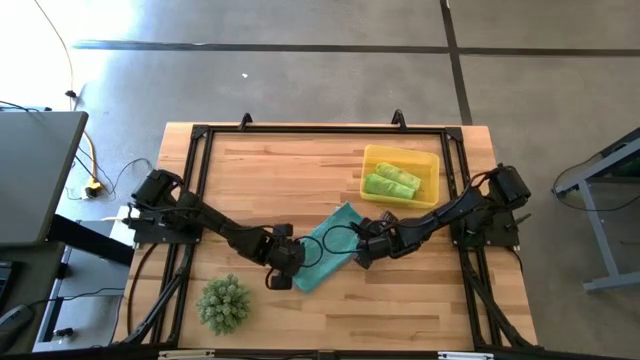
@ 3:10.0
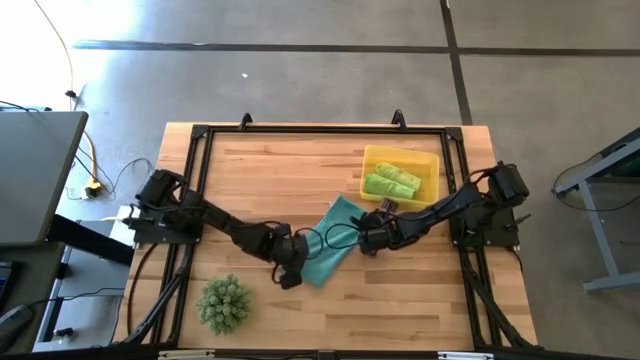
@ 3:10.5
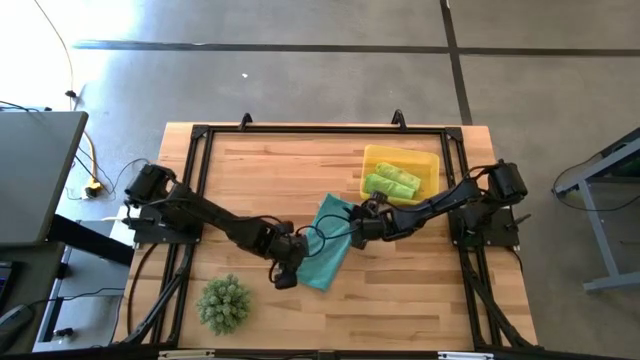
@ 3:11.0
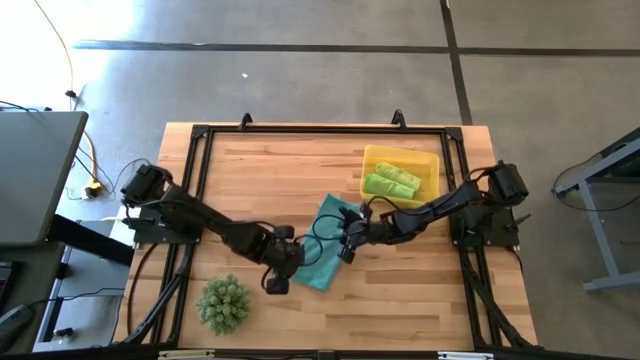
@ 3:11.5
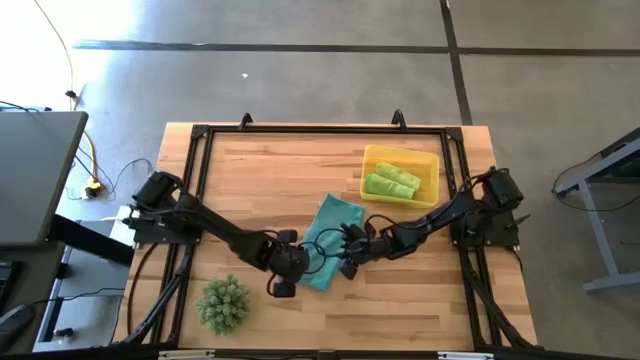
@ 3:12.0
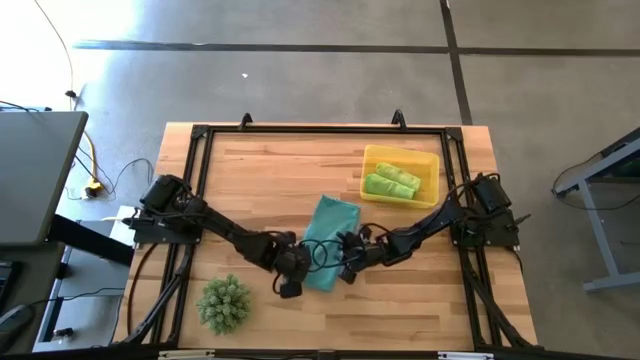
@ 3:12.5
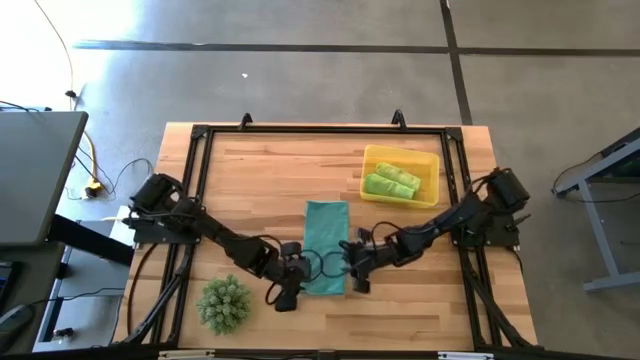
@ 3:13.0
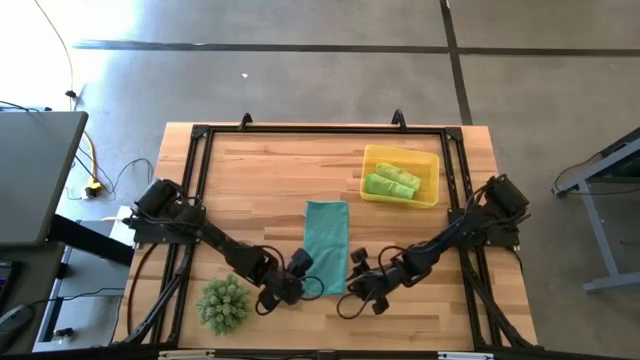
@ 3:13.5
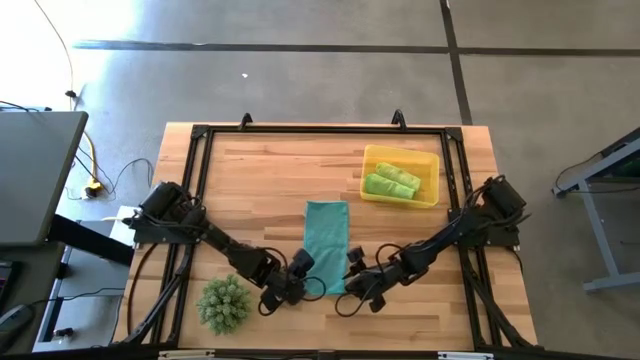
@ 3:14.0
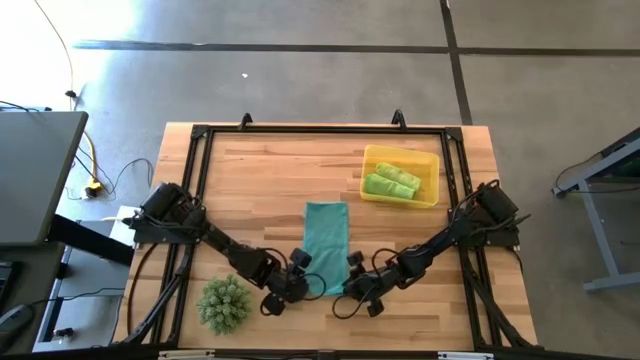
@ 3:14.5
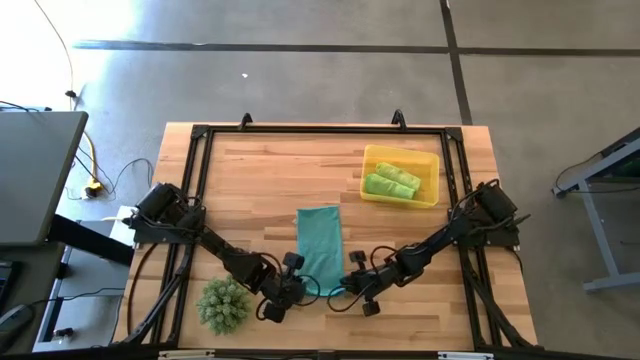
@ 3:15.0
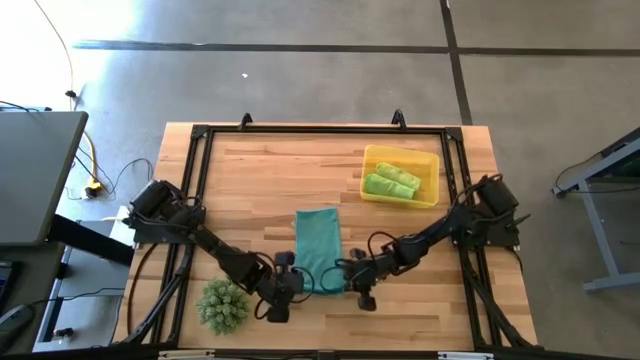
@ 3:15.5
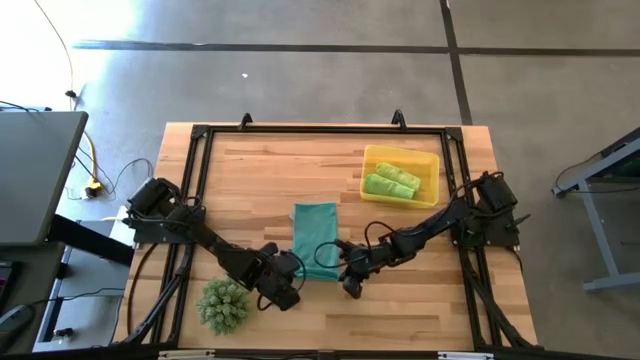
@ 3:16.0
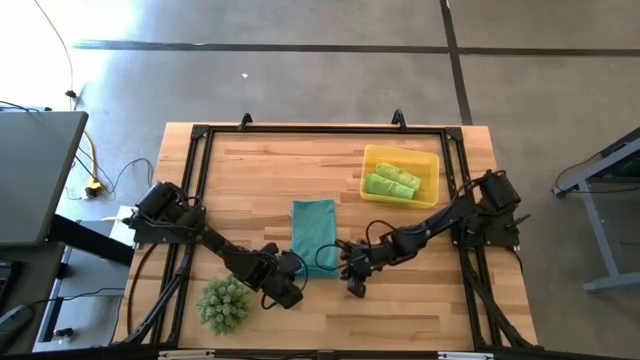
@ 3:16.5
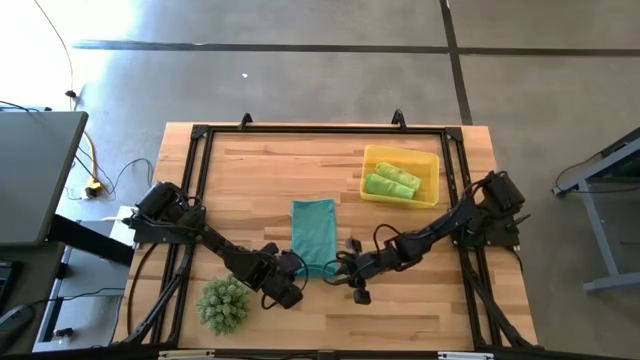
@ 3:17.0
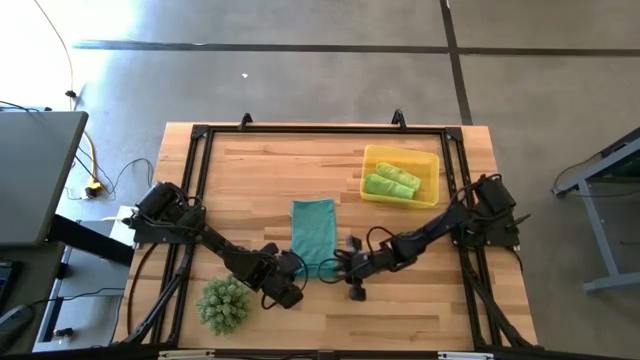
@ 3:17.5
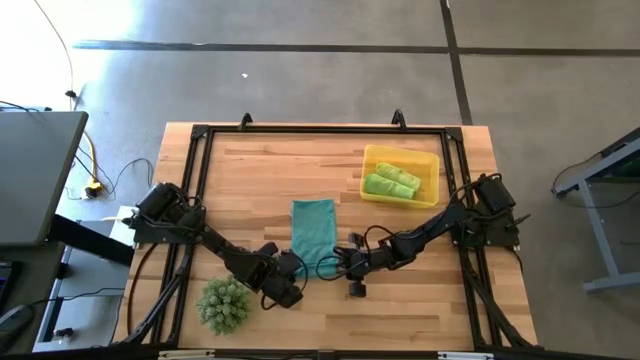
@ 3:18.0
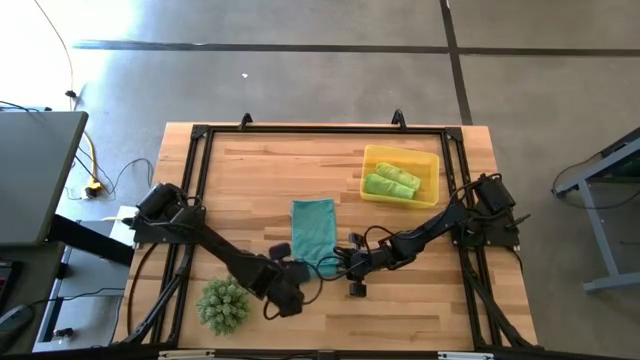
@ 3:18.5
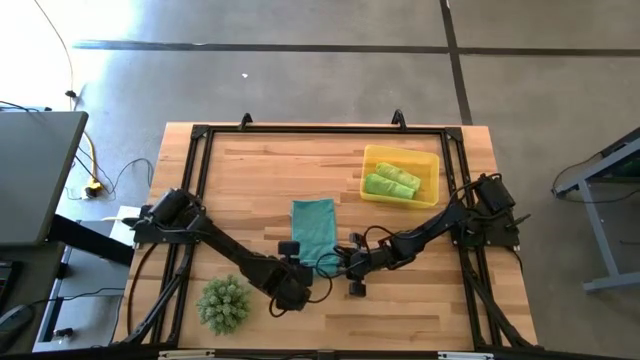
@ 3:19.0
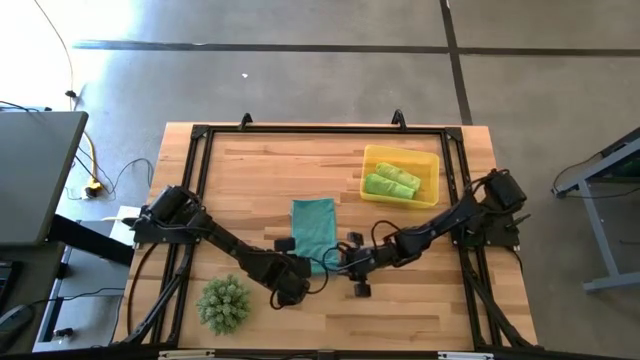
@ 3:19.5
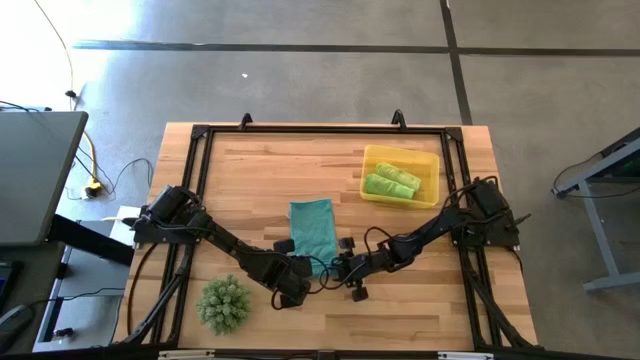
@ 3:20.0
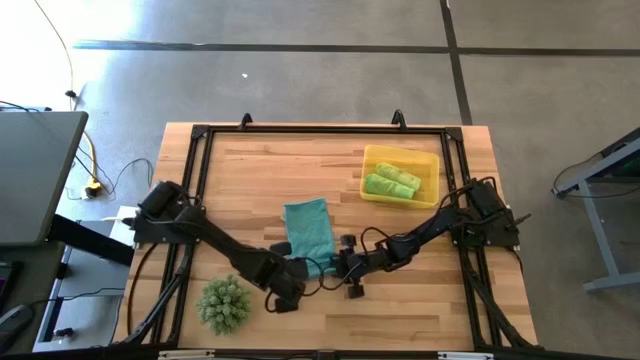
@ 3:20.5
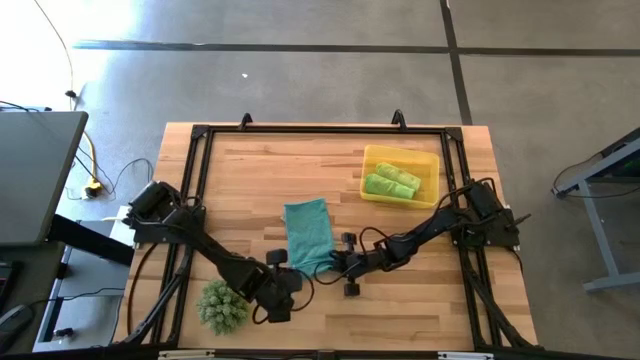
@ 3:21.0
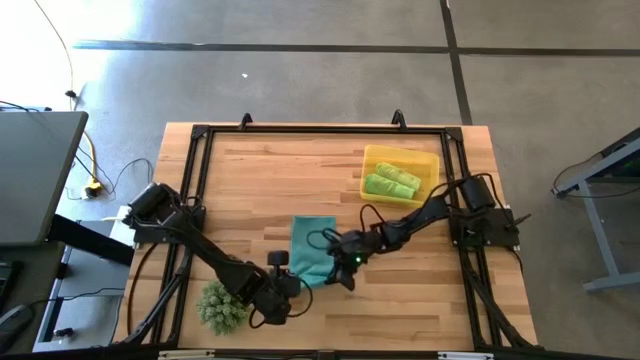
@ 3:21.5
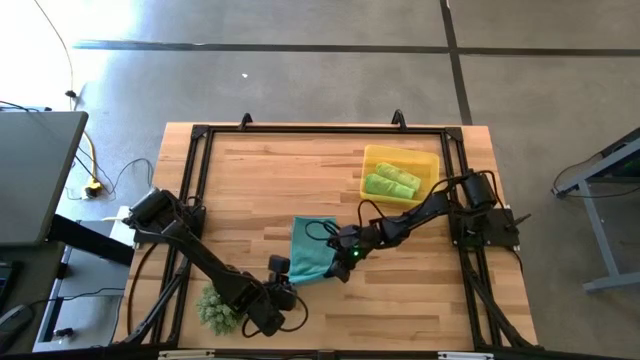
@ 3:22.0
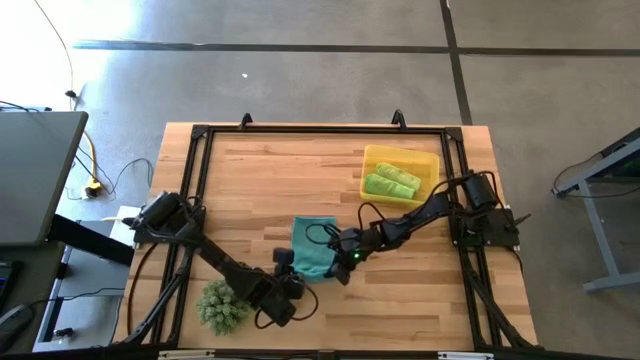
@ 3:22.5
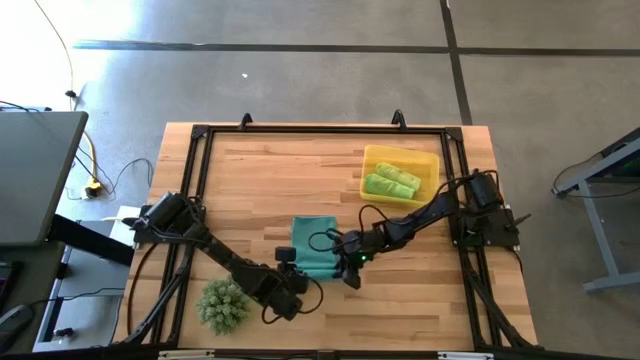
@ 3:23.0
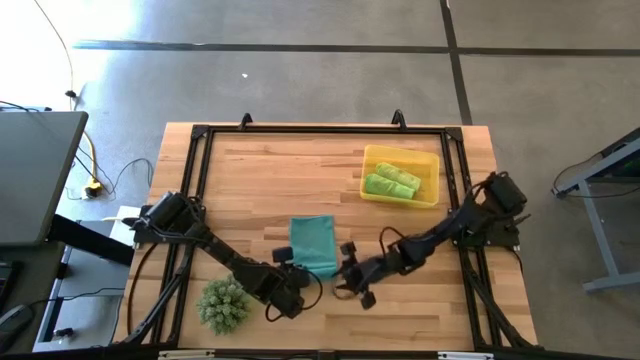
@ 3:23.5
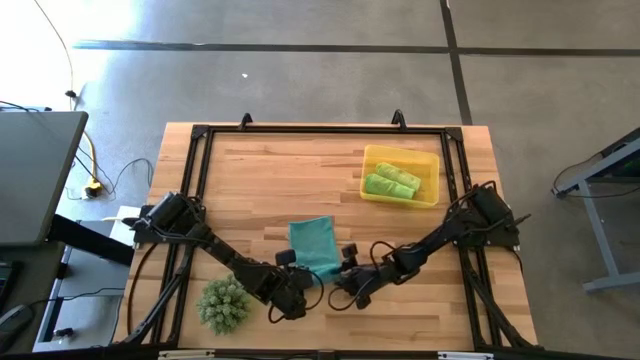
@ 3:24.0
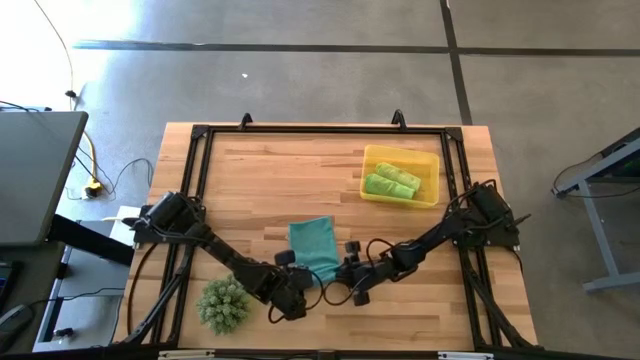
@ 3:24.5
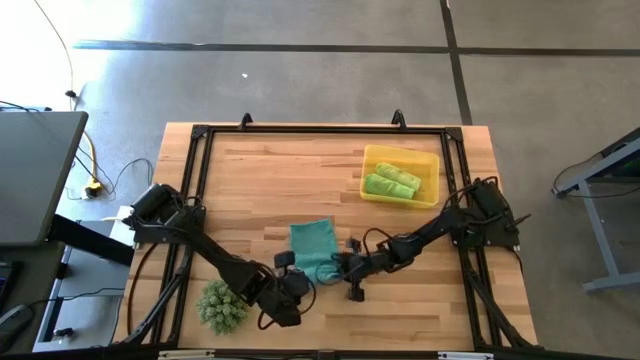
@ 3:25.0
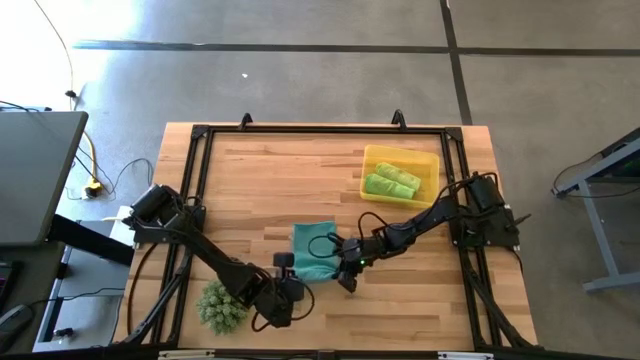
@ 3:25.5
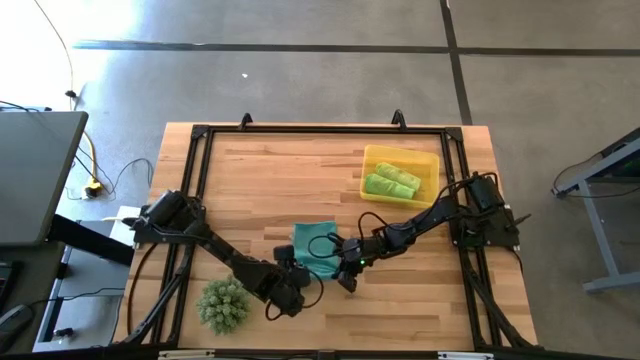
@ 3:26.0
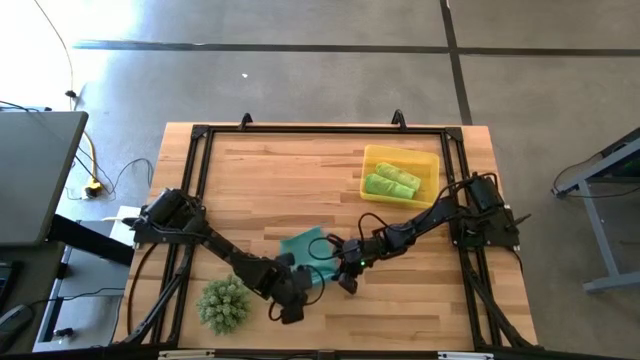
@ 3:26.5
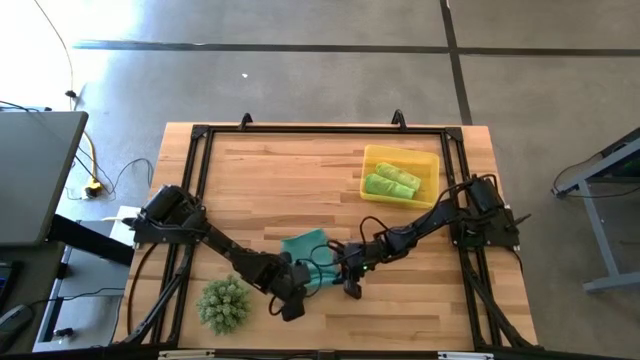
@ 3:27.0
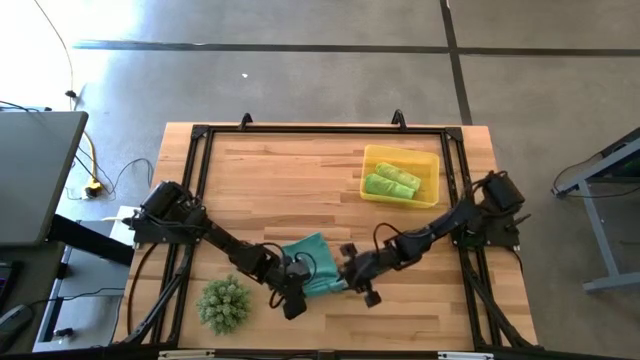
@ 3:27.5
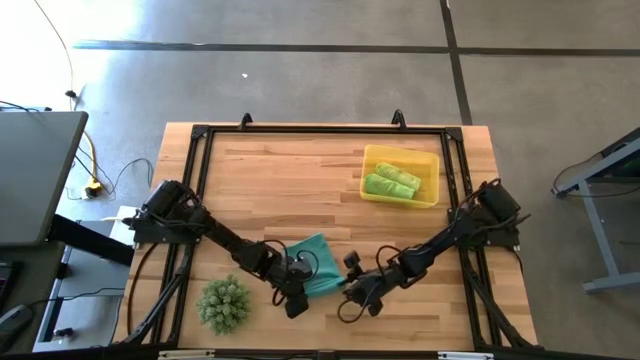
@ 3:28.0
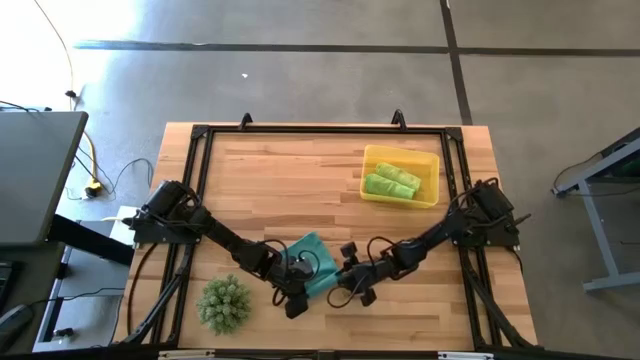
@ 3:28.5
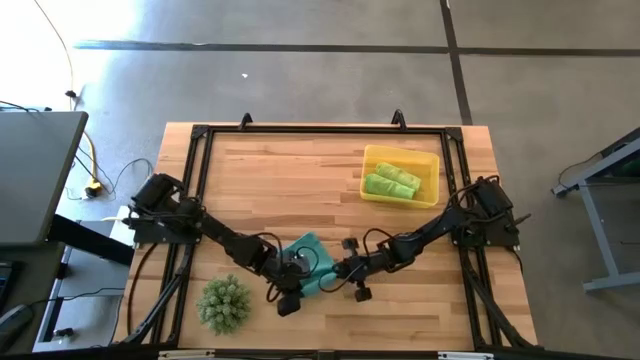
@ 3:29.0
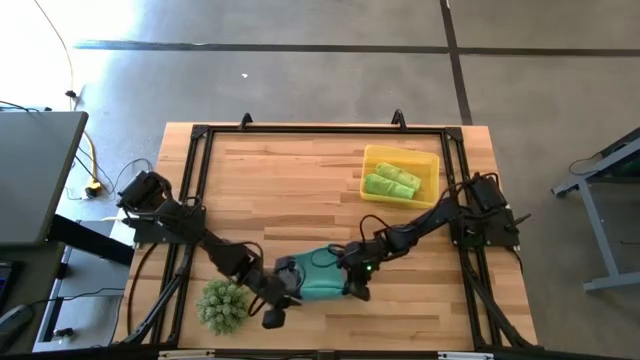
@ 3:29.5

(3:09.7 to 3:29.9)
Task: Roll microfiber towels into tight, uniform cylinder then place into a basket
Roll the blue towel

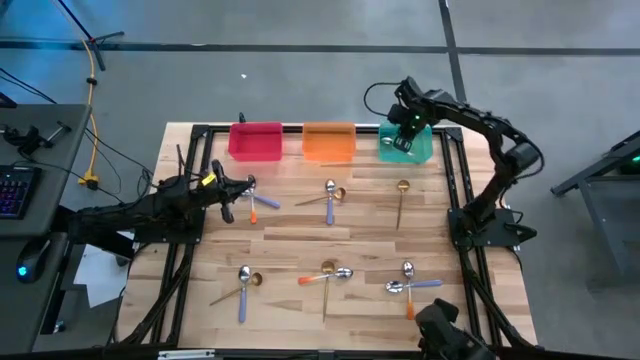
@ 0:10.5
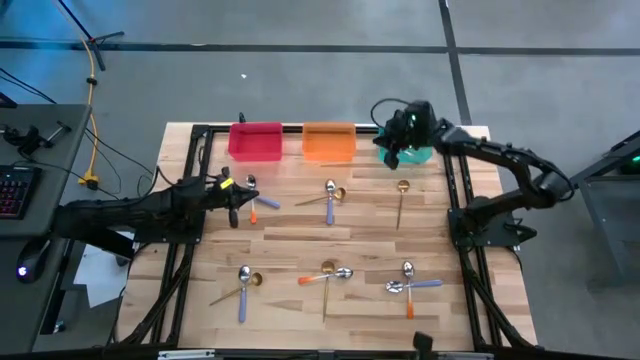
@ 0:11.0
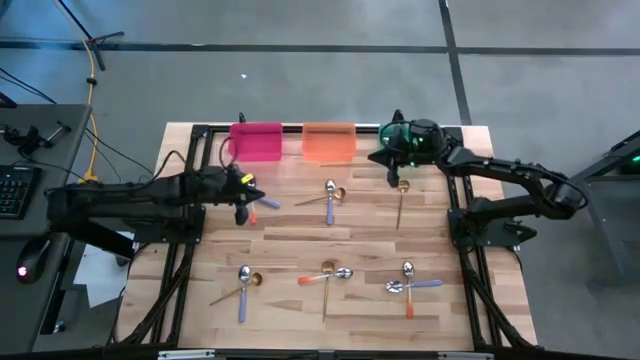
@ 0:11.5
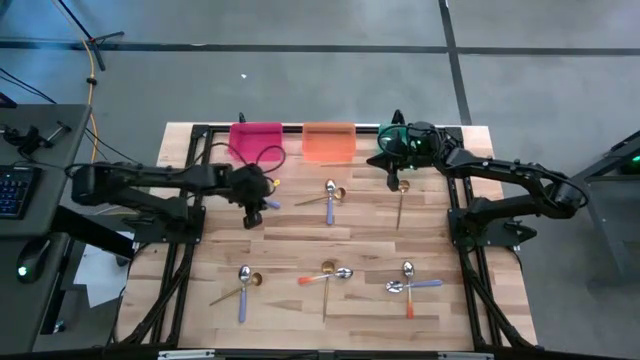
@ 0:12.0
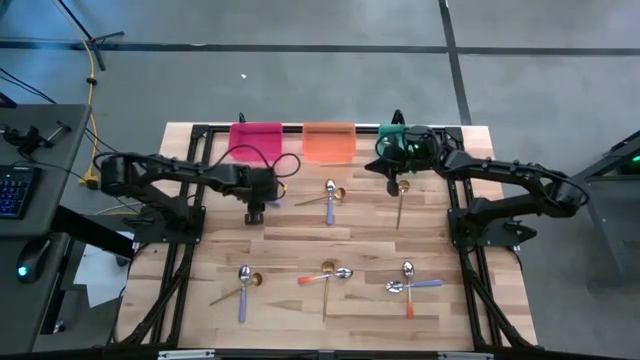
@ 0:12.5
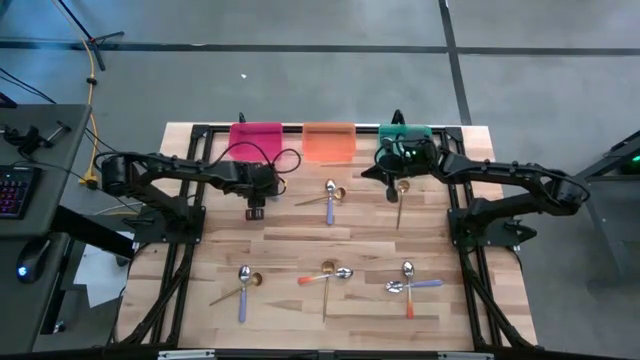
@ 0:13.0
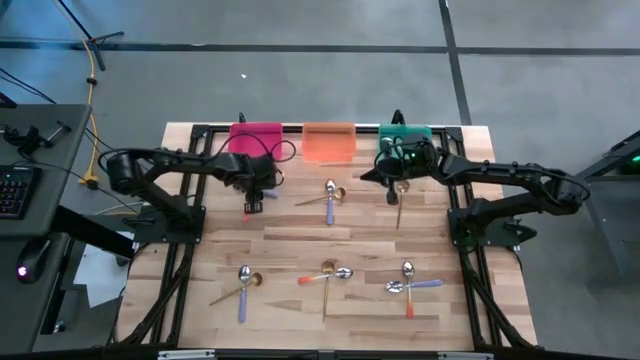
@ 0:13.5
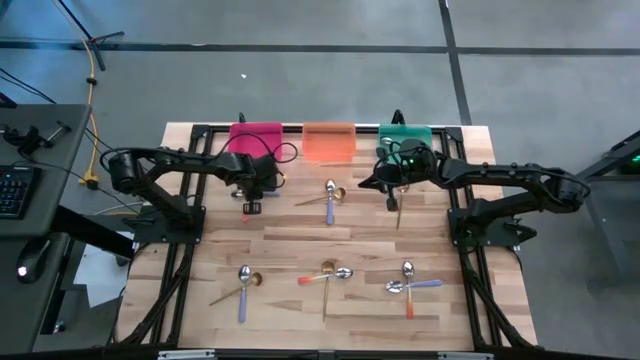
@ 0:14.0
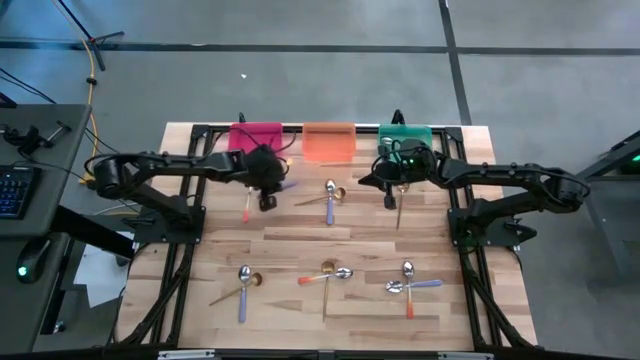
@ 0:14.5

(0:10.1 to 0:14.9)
Task: Sort silverware by color (type)
Put the top left light violet spoon into the orange bin
